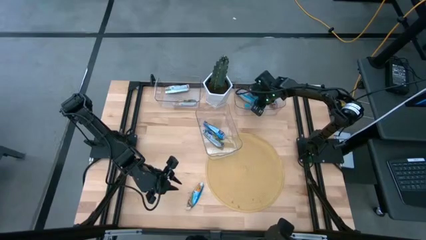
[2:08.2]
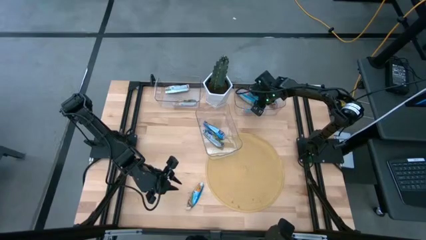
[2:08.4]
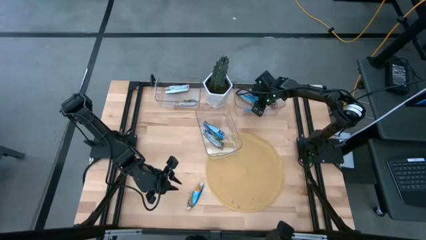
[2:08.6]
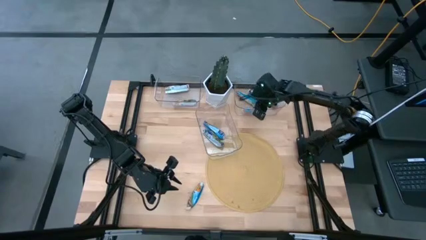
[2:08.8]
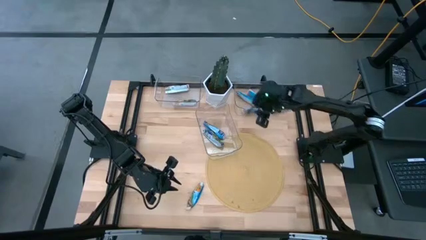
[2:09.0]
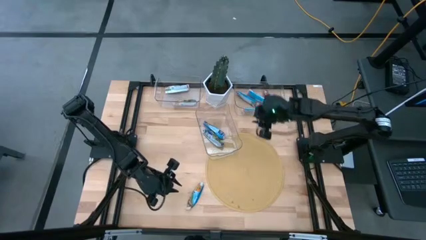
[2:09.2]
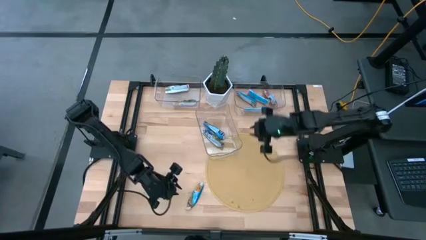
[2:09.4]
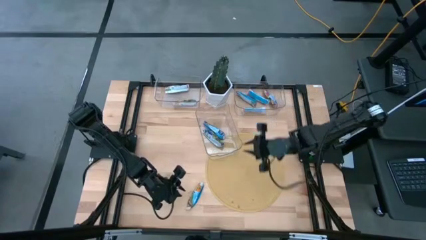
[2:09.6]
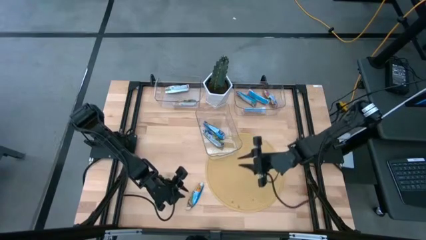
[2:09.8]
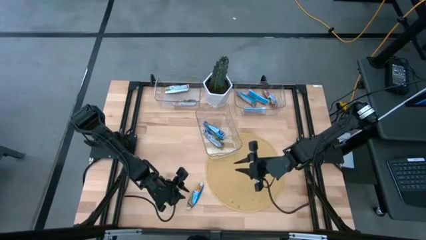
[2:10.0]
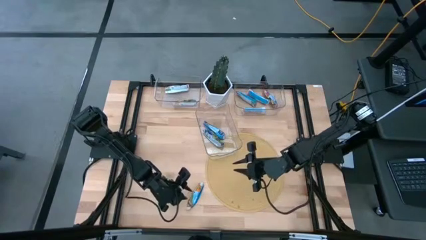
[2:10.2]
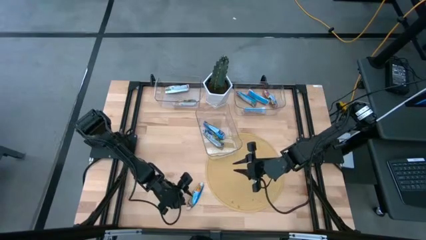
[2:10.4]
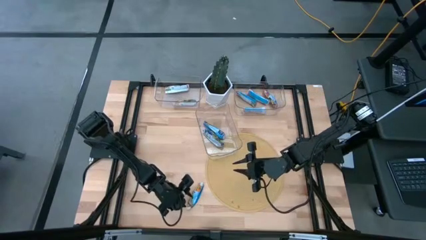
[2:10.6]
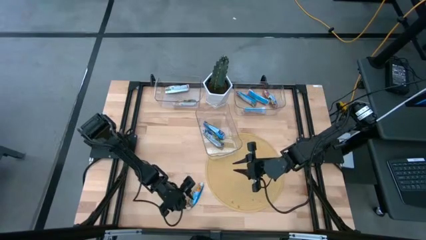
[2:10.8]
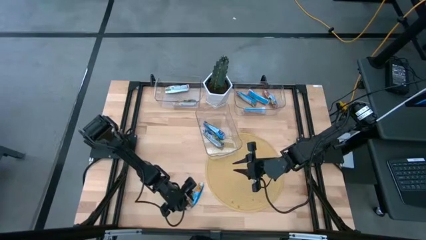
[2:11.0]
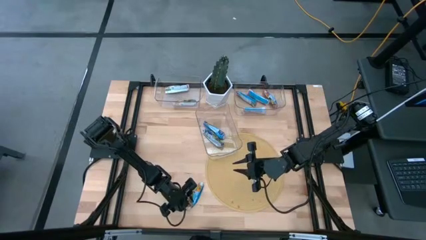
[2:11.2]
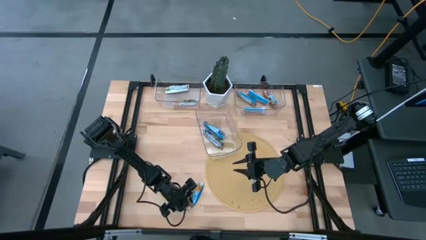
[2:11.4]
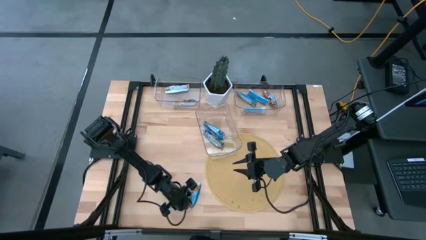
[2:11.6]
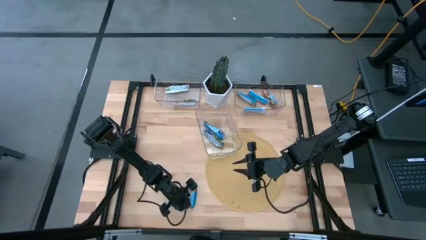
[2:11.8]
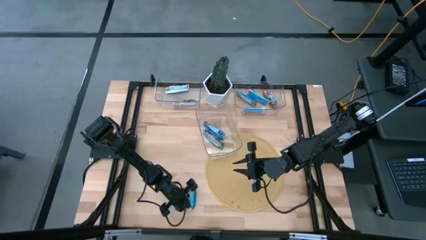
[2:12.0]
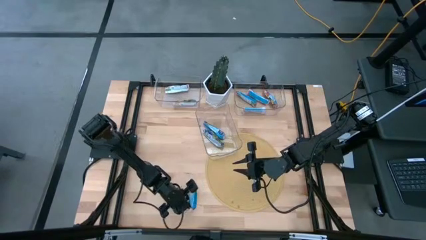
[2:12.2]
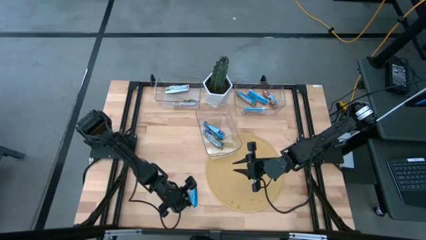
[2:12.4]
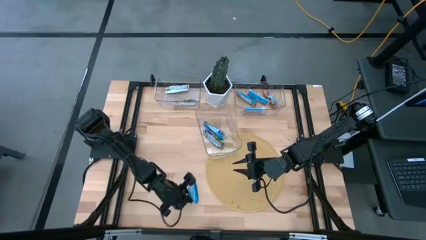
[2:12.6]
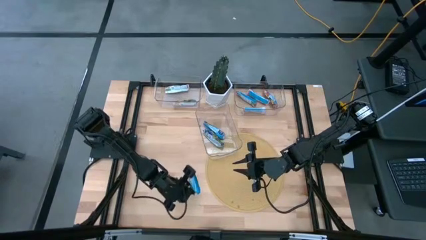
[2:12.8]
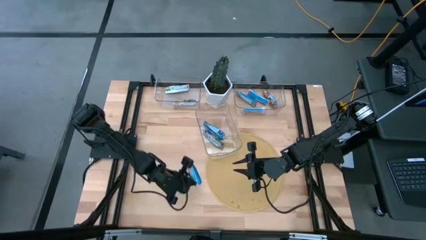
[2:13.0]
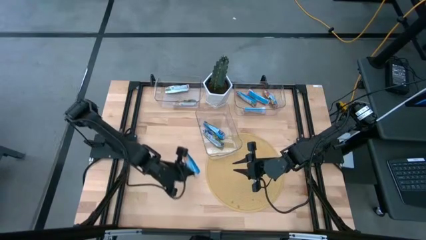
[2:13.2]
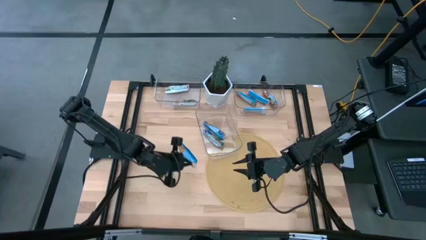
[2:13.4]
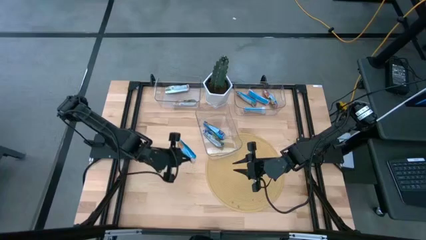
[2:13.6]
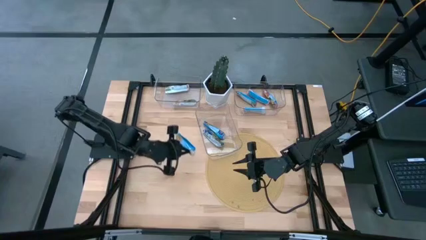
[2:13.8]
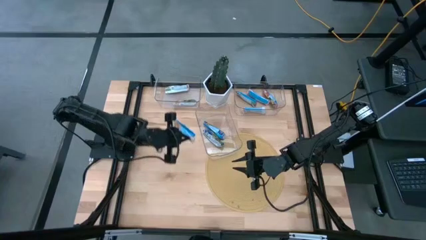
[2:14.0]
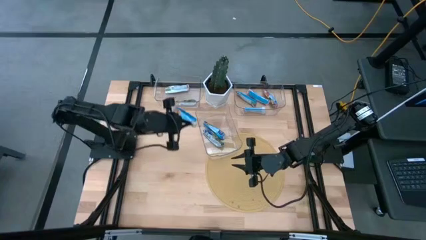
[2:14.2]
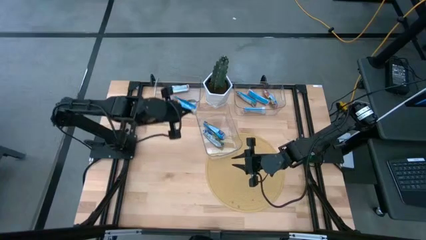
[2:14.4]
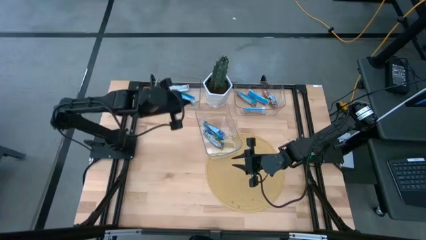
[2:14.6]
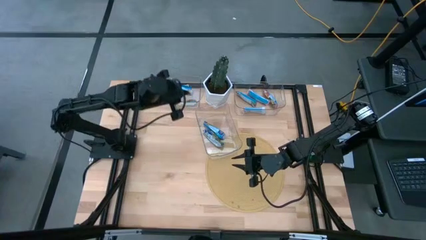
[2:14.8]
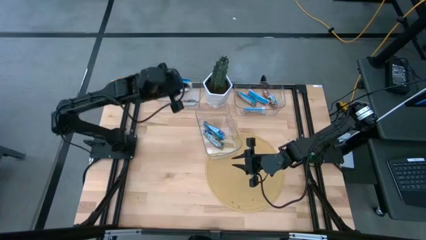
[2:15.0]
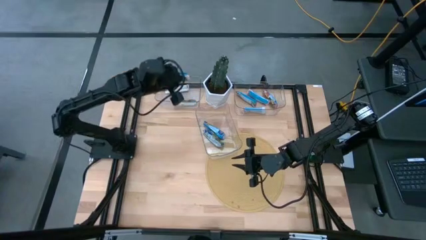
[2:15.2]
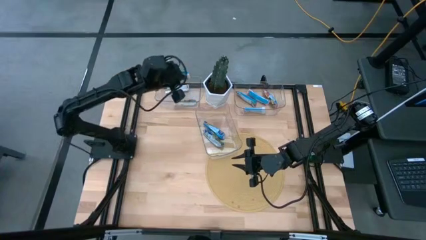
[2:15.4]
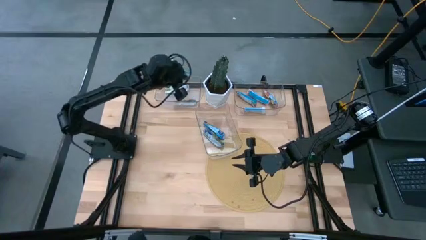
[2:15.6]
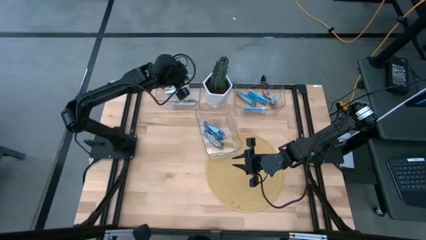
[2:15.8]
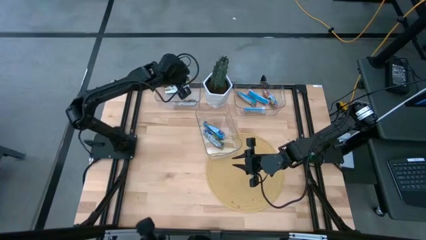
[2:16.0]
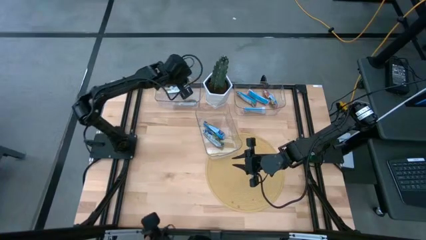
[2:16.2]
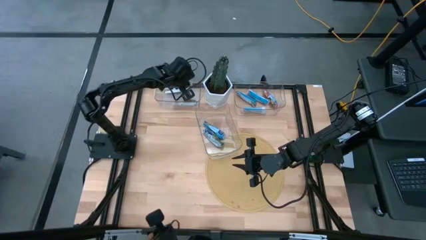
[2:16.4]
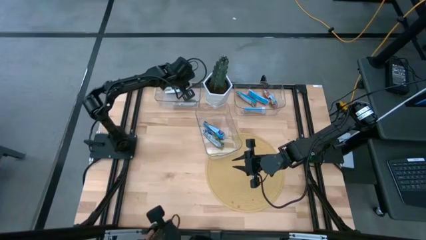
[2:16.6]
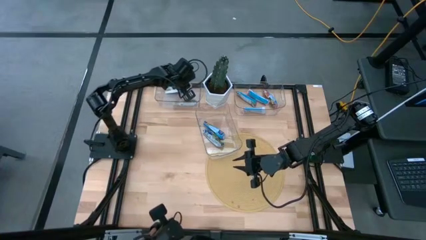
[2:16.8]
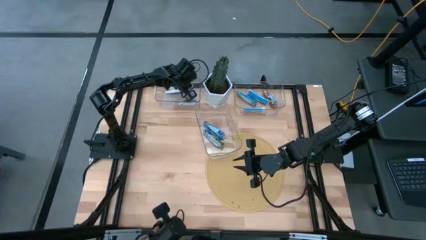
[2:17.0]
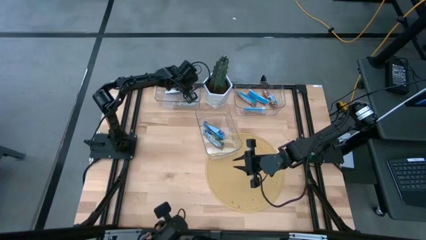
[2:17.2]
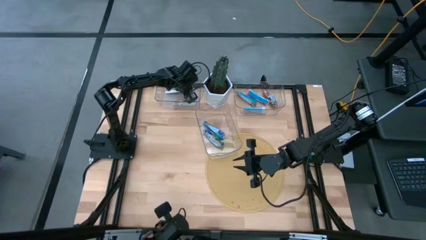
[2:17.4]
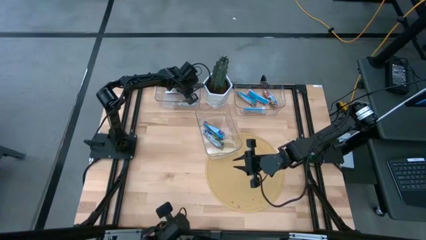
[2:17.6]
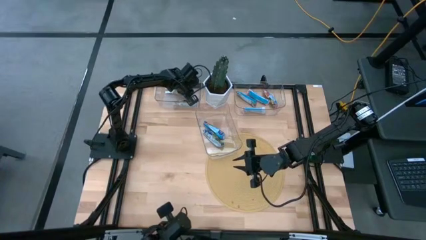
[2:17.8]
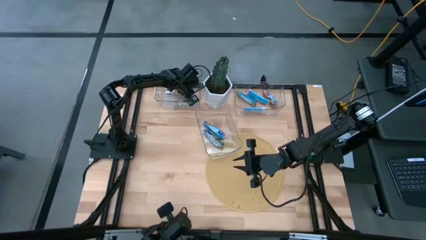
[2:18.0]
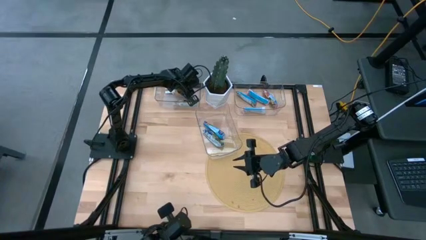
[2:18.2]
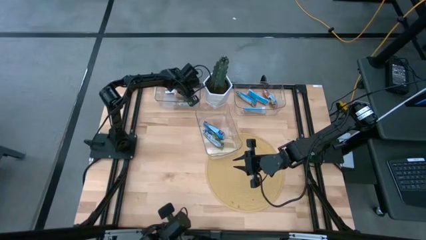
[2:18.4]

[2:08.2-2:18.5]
Task: Pick and place Granola Bars by type
Put the yellow green granola bar into the left transparent bin

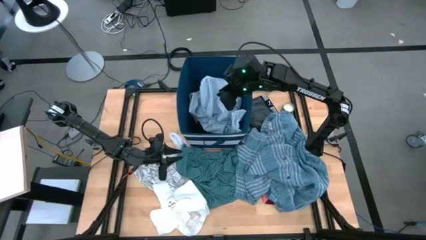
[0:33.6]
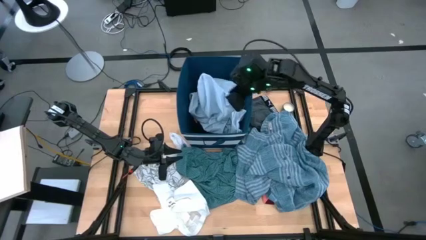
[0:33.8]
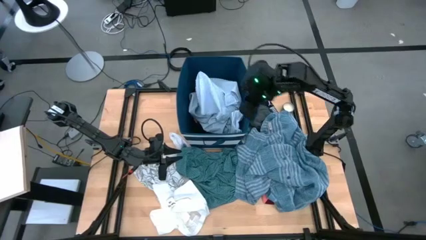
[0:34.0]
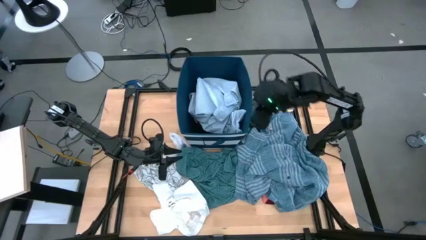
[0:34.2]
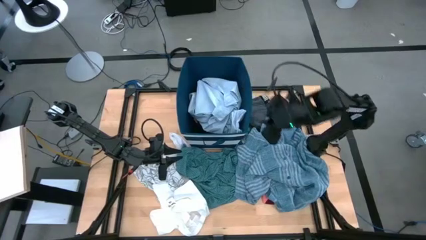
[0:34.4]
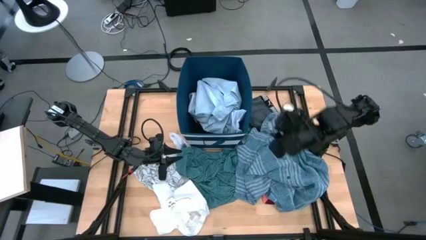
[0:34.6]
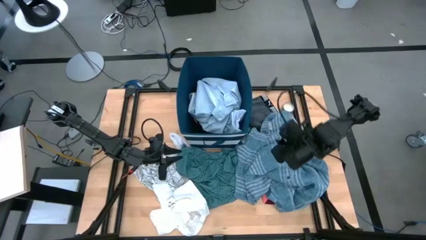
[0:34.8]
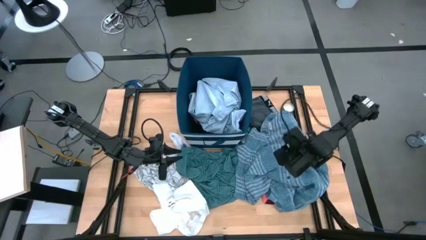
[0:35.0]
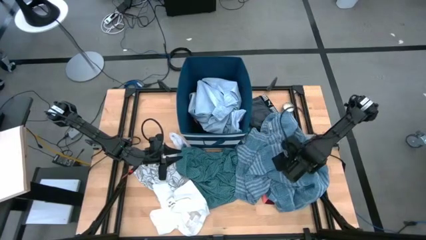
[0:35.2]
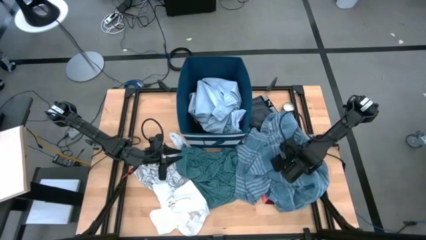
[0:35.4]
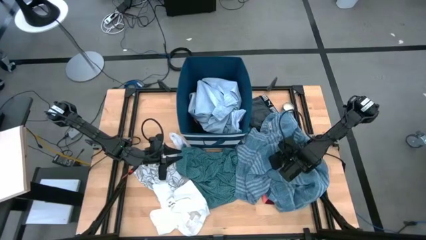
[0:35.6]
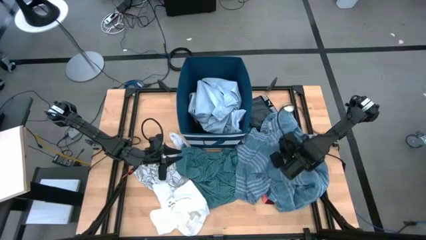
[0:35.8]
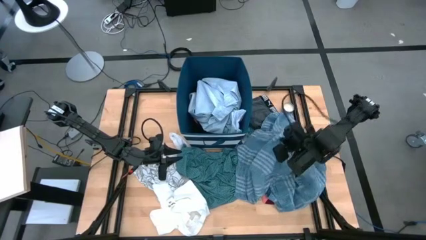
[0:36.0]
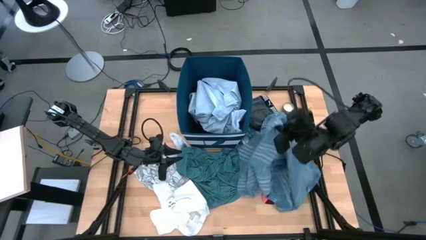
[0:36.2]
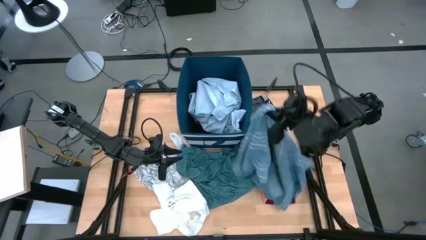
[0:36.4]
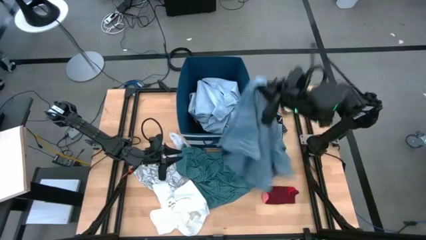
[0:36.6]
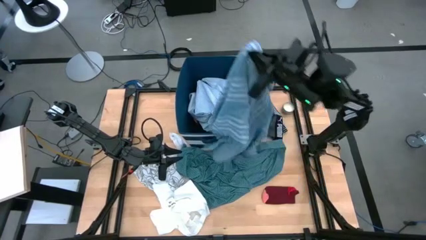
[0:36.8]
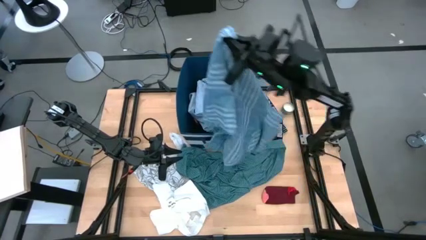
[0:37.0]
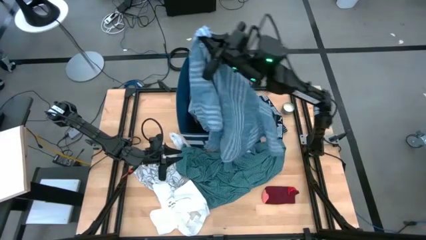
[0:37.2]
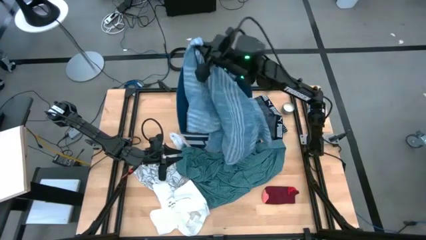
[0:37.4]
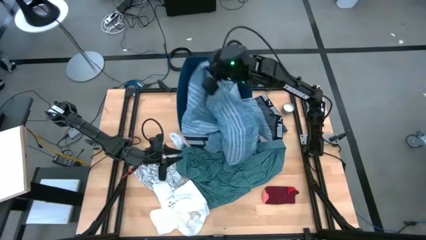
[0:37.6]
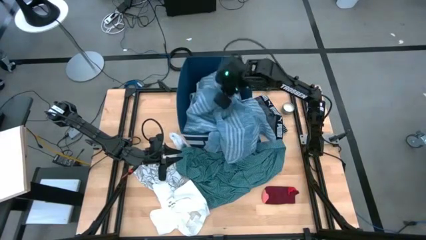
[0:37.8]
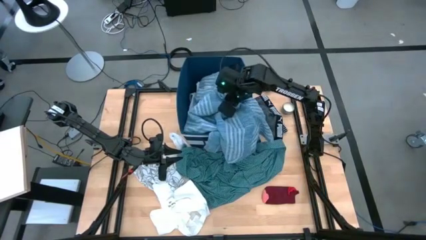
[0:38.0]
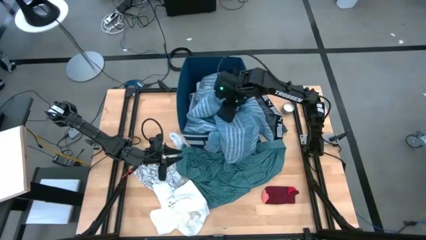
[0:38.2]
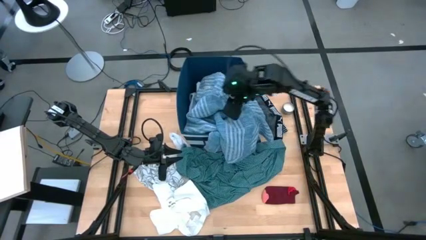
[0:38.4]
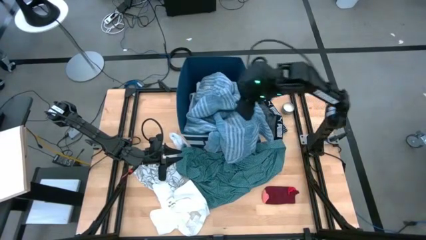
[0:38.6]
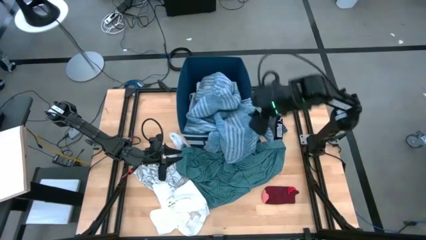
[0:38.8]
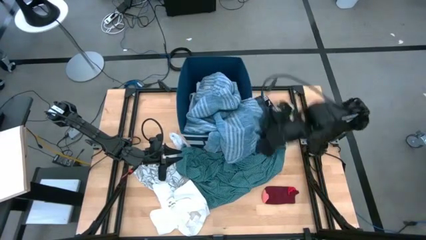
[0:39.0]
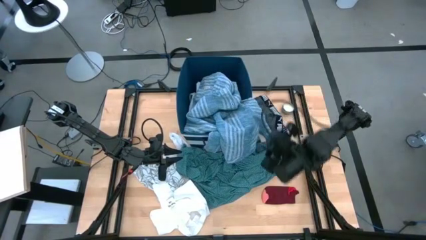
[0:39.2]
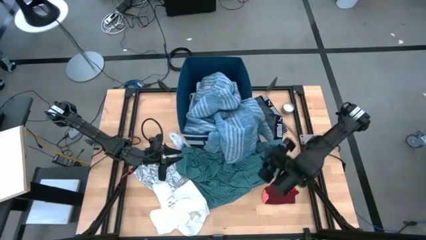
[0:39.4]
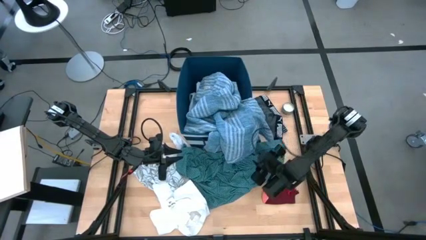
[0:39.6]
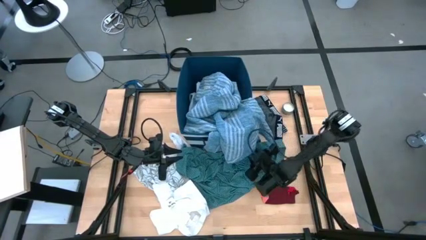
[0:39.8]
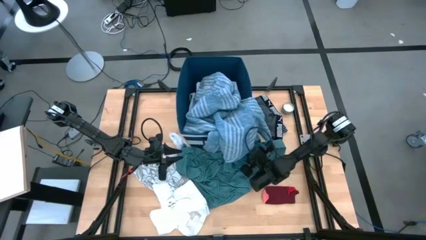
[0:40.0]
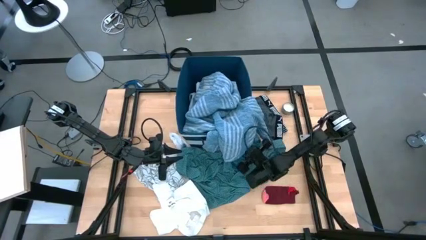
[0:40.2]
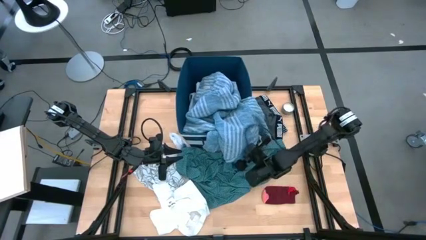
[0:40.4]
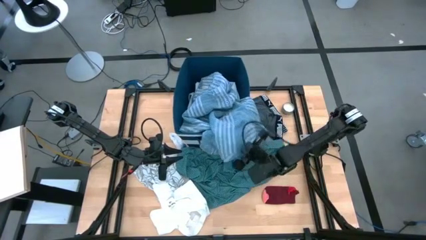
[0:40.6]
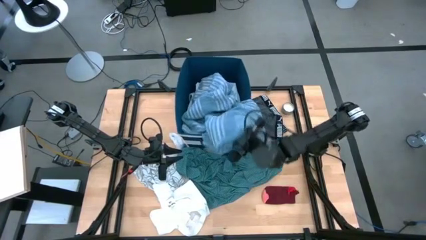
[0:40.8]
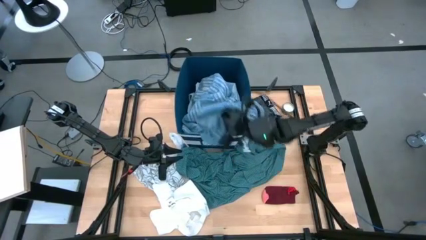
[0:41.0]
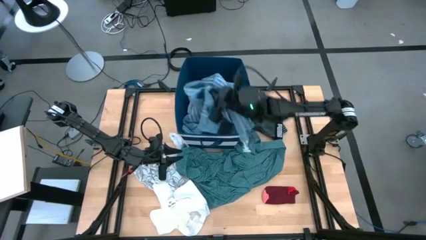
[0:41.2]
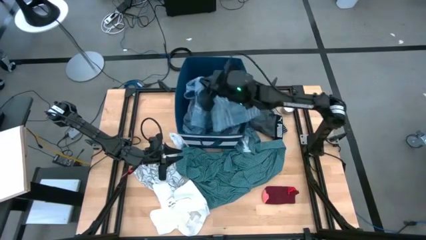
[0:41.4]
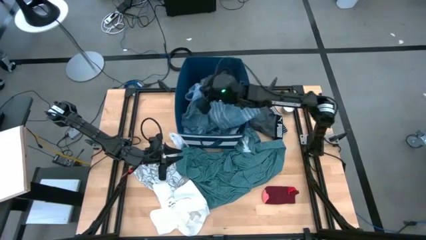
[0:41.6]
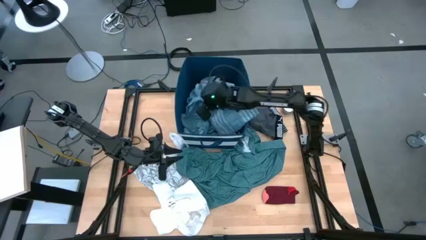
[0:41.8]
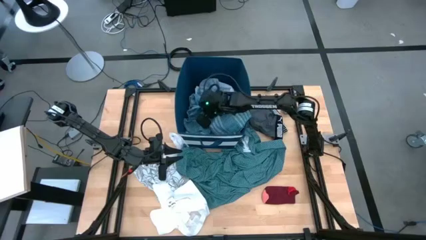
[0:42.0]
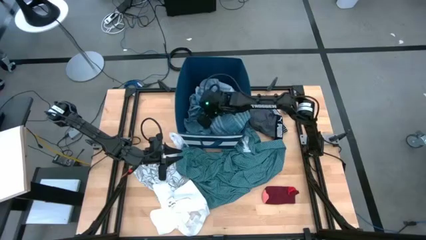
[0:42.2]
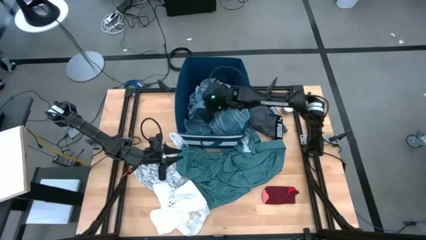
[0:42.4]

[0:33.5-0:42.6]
Task: Sort clothes
Put the blue shirt into the blue bin
